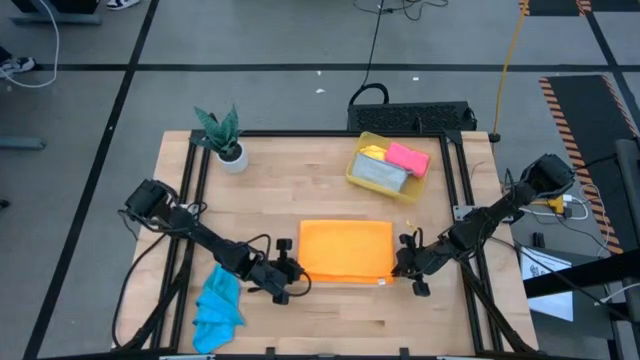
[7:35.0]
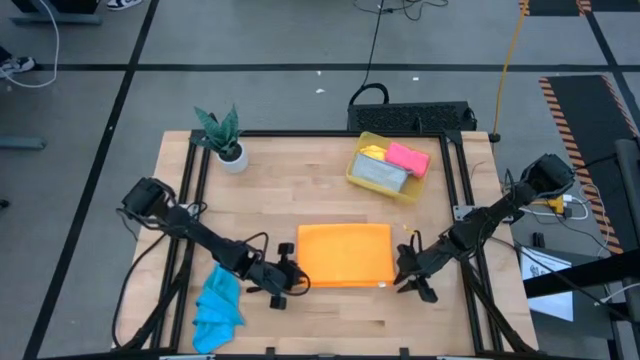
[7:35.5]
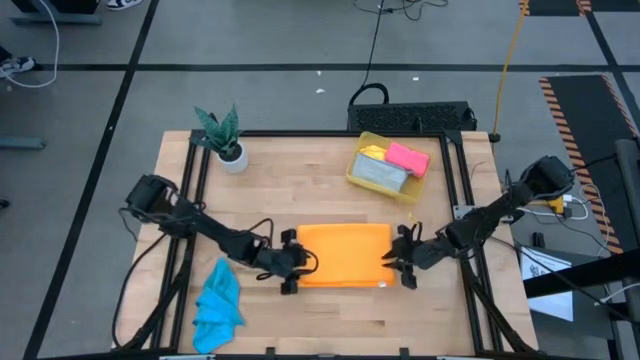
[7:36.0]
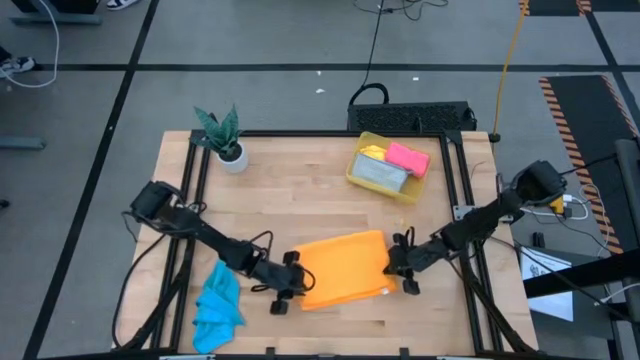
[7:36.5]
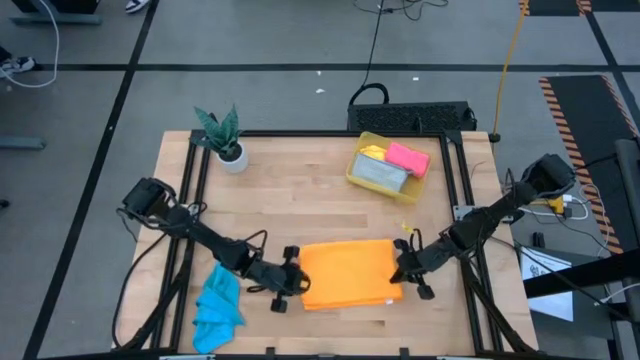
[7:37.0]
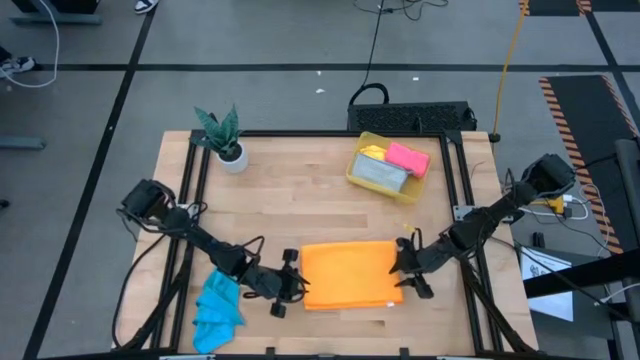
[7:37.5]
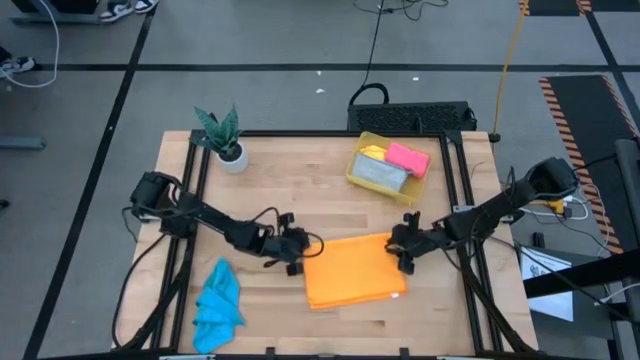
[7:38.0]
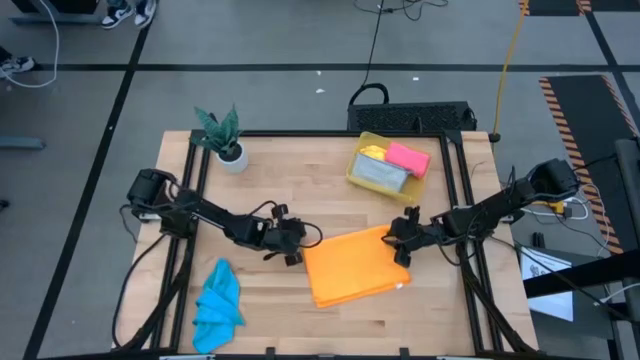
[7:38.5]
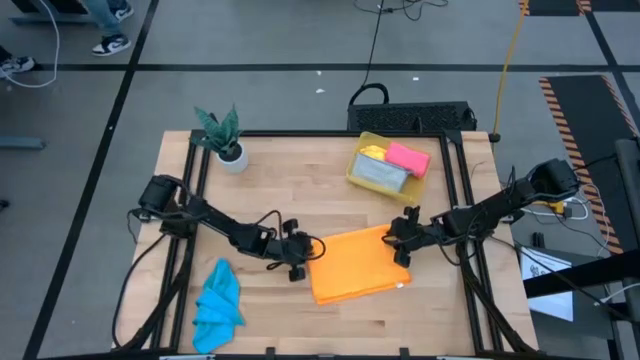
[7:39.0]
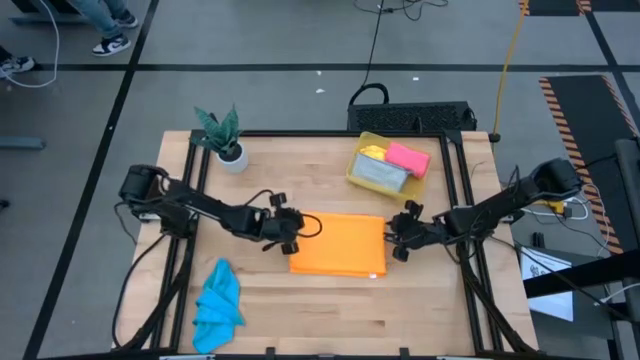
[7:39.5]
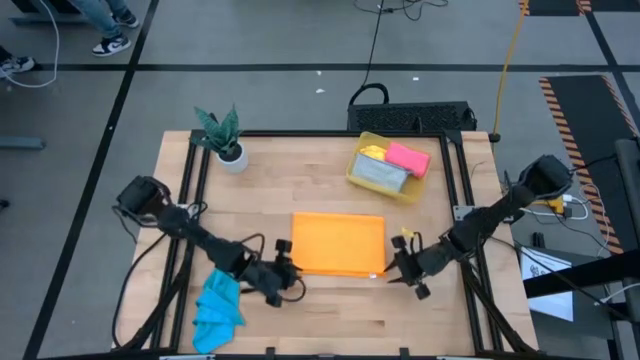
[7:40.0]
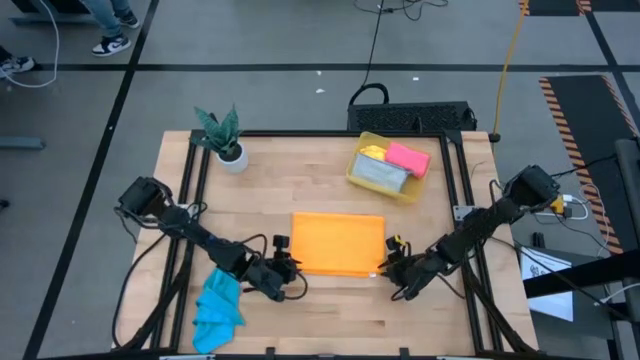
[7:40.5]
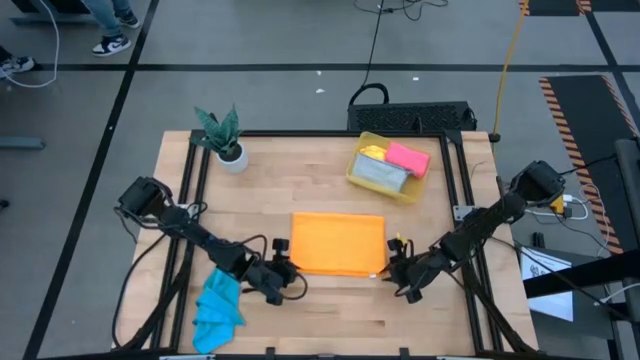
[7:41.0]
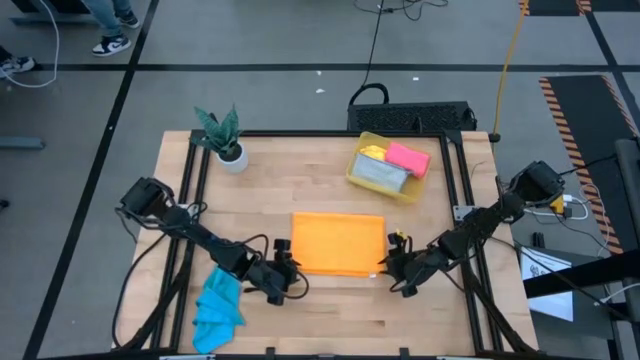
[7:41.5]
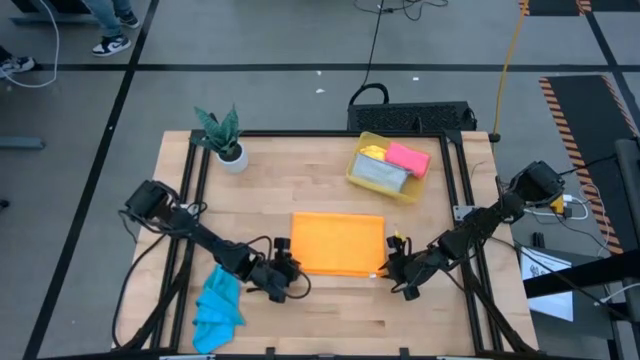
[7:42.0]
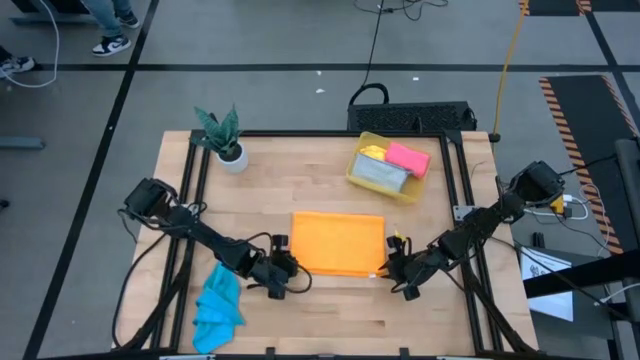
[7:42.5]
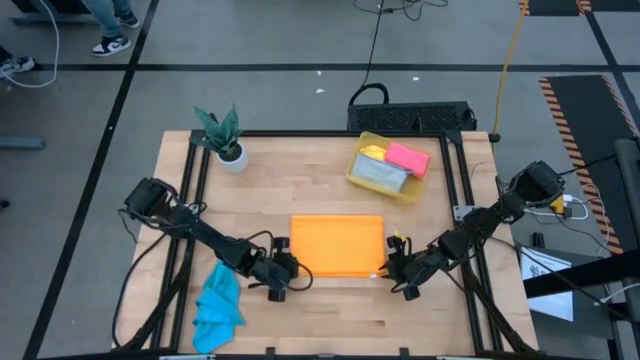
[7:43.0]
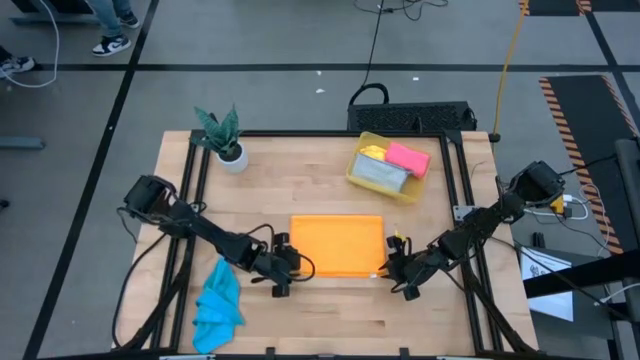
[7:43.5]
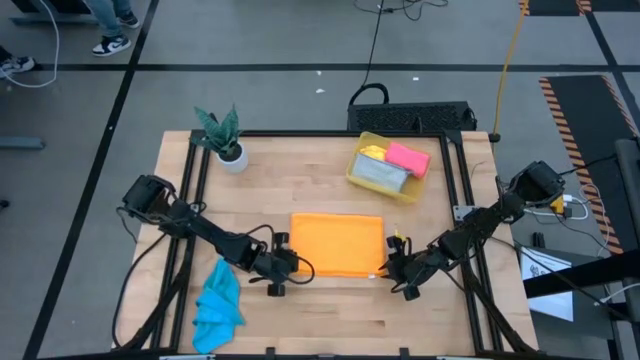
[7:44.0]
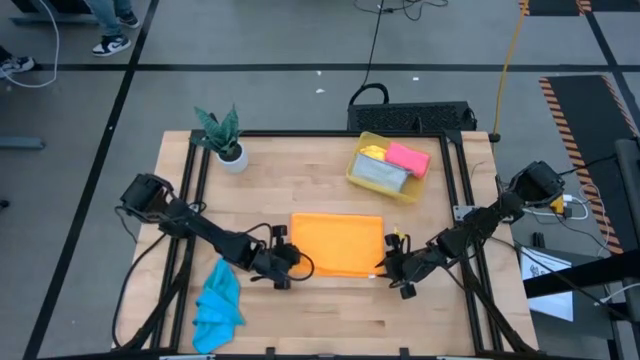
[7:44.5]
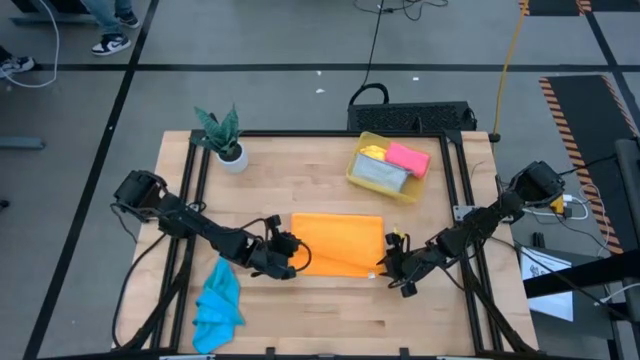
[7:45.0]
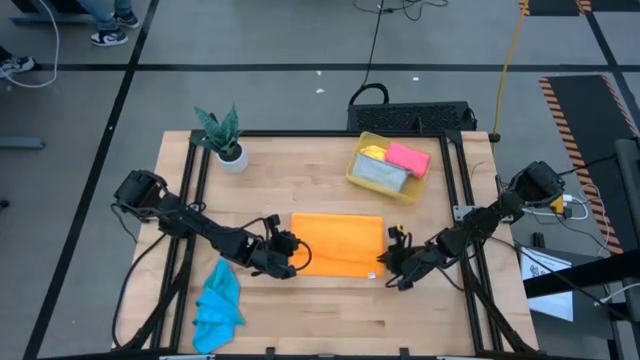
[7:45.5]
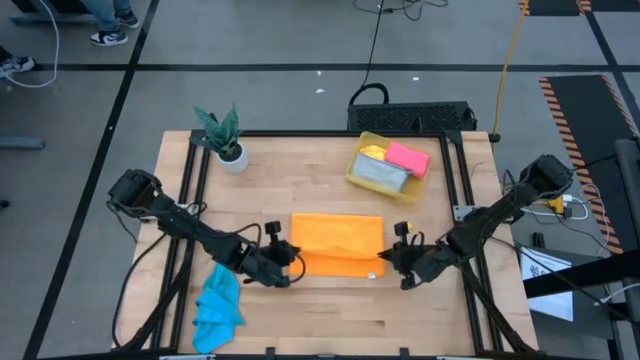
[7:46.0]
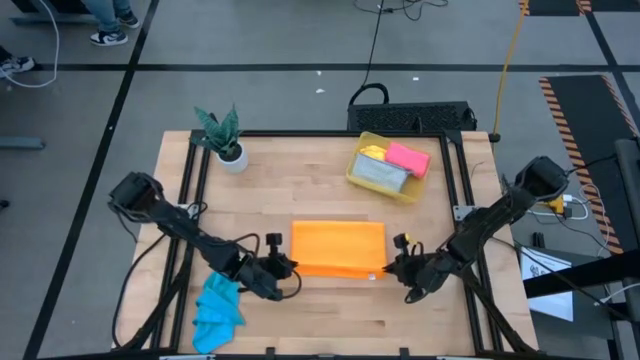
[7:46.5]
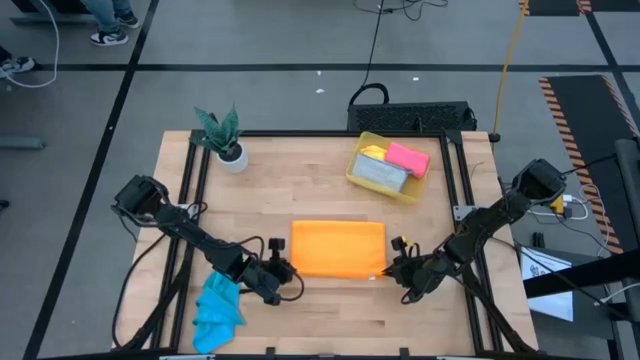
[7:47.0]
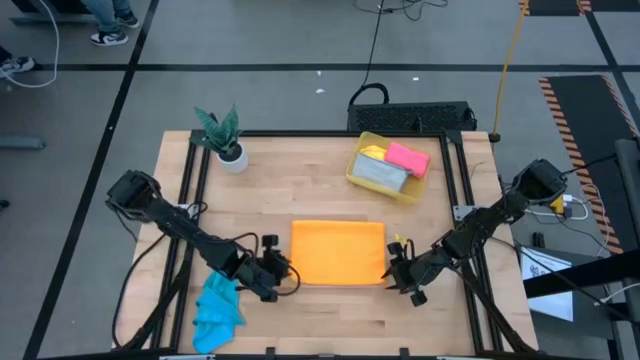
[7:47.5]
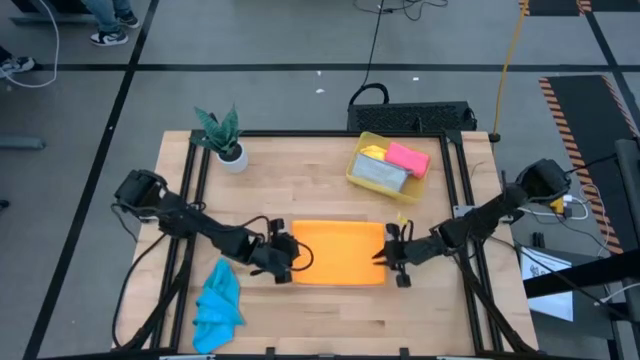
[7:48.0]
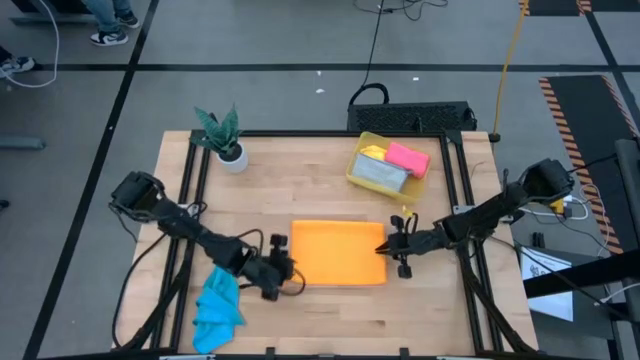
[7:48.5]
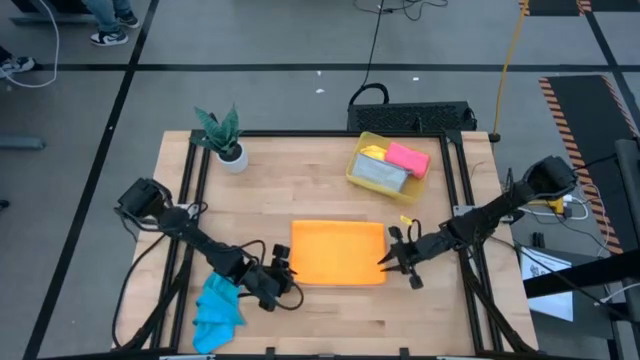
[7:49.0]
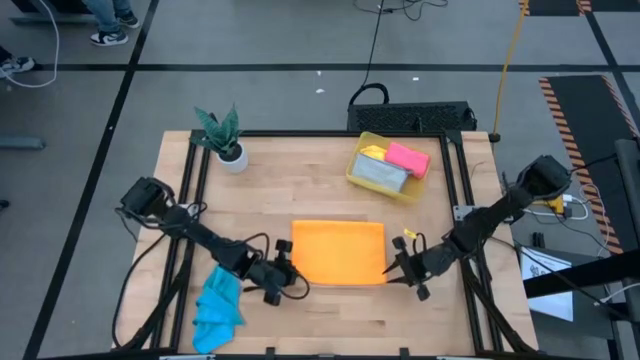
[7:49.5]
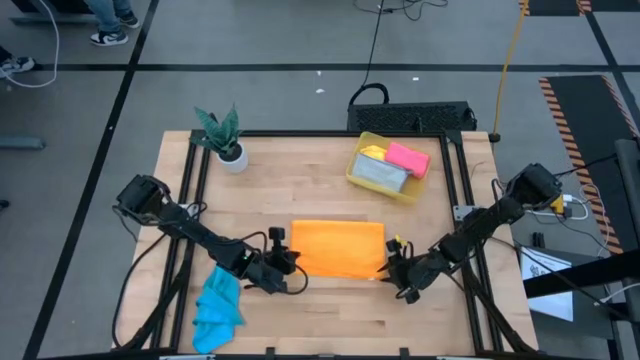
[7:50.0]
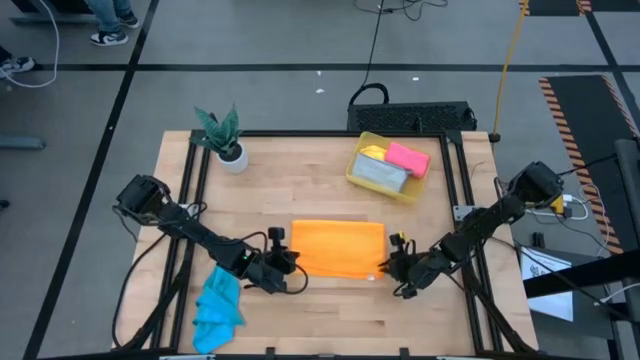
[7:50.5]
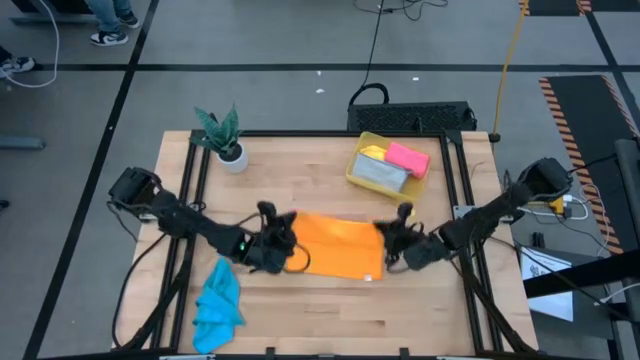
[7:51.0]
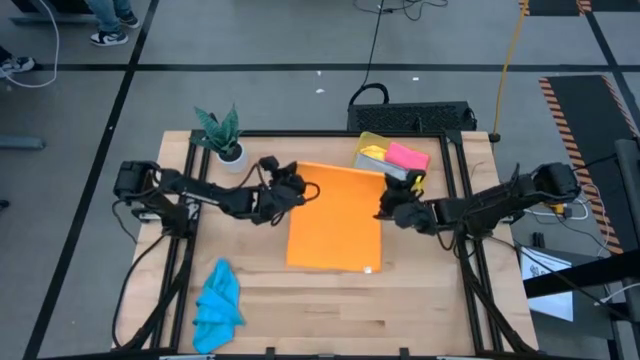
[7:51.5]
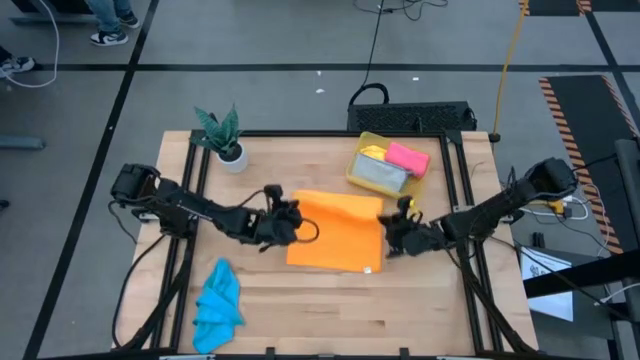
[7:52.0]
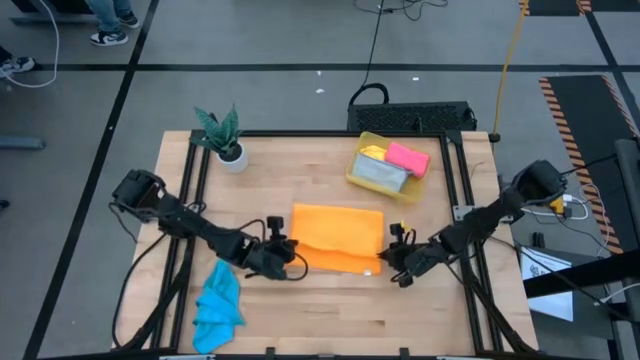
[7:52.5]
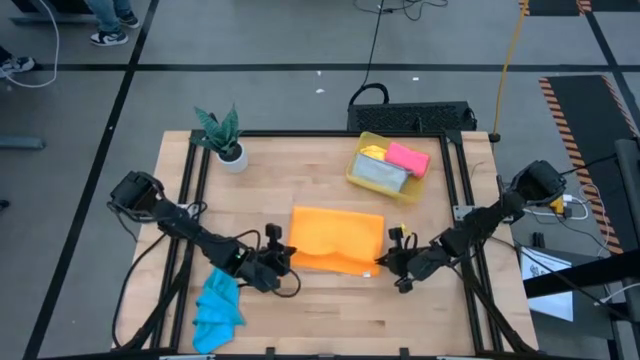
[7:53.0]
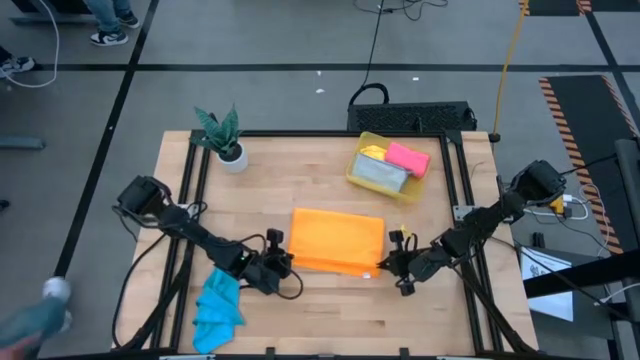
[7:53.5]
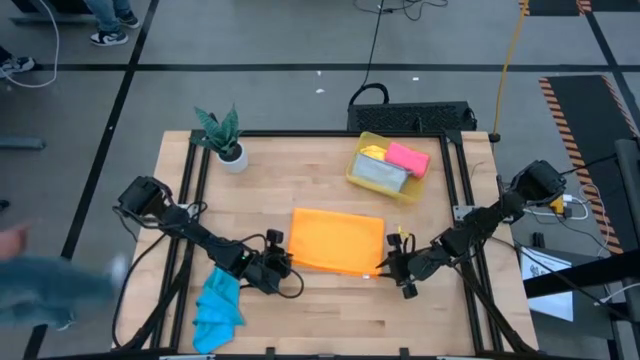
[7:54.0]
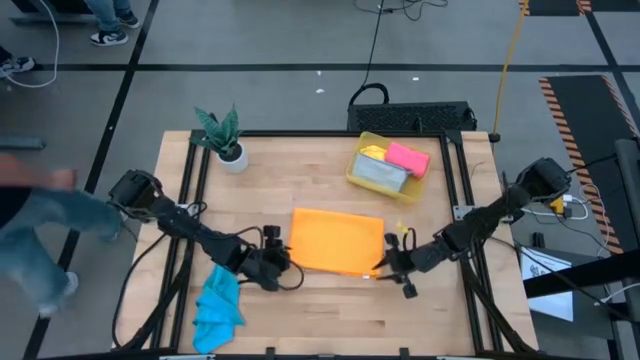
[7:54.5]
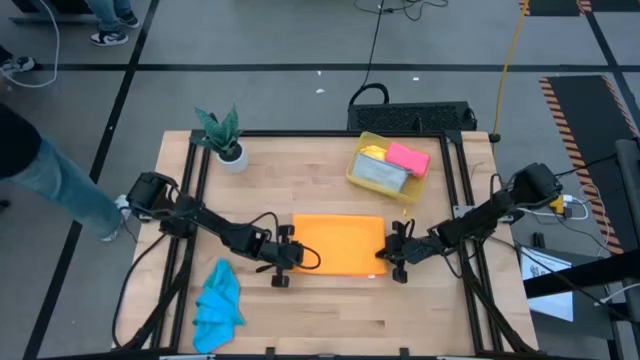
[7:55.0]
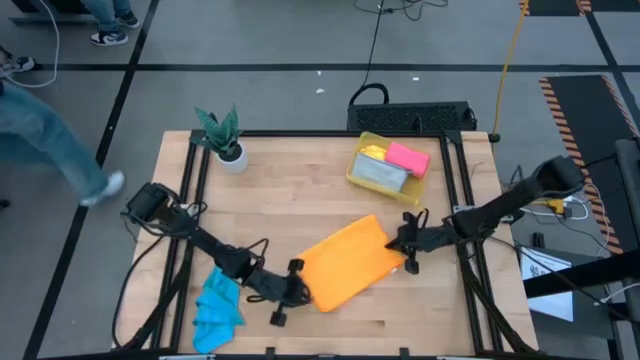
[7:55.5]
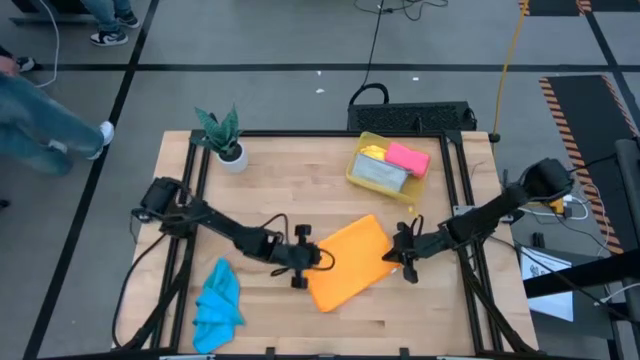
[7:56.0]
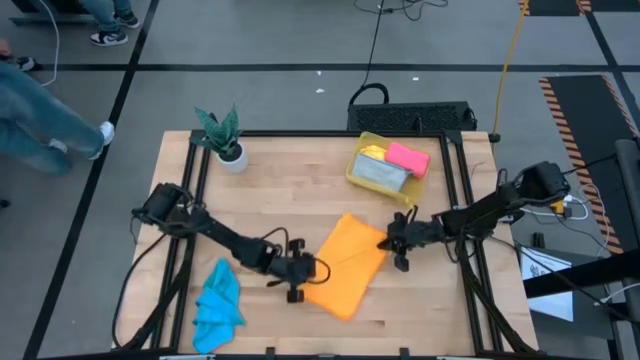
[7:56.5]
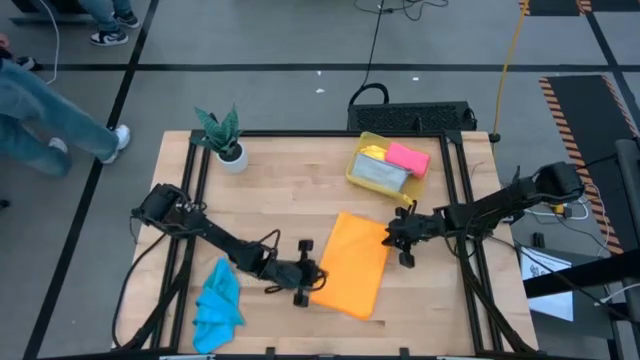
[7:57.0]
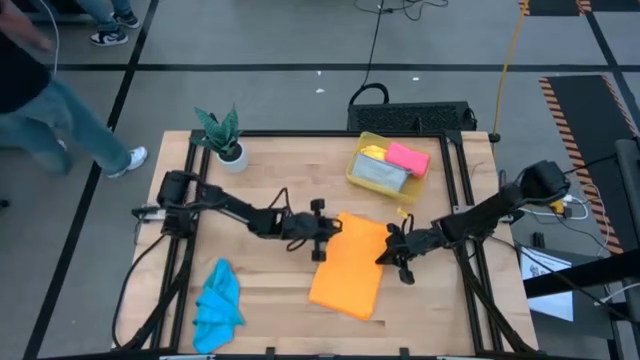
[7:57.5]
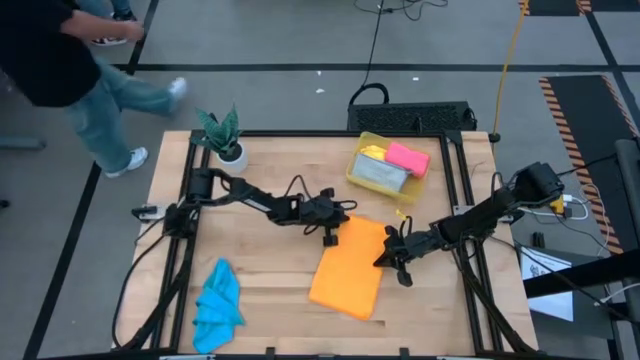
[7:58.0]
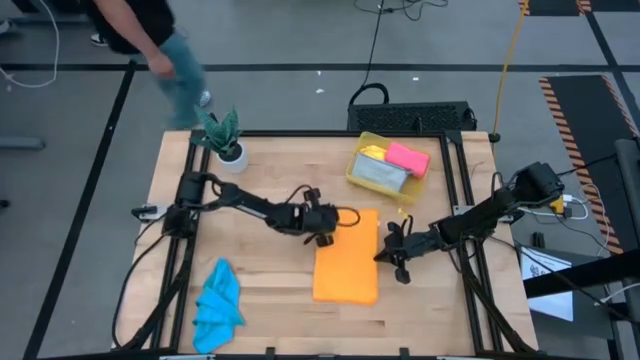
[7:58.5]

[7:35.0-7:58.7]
Task: Fold microfiber towels
Fold the orange kitchen towel
